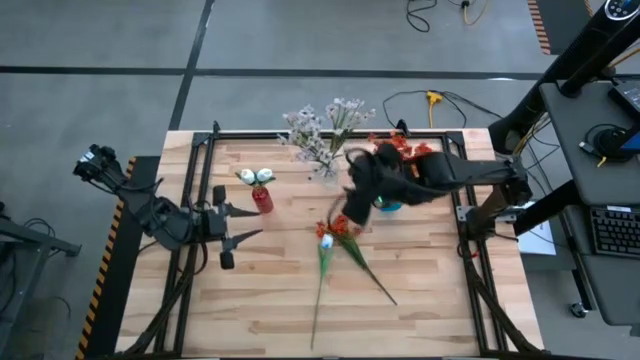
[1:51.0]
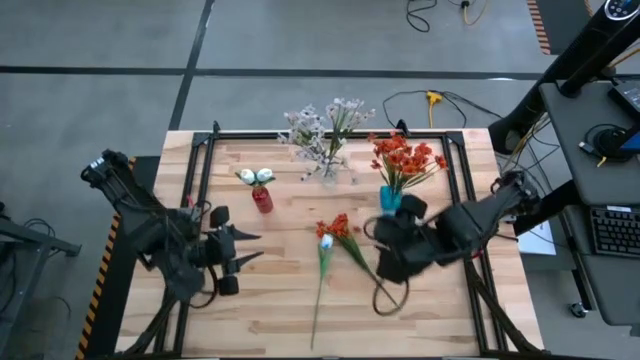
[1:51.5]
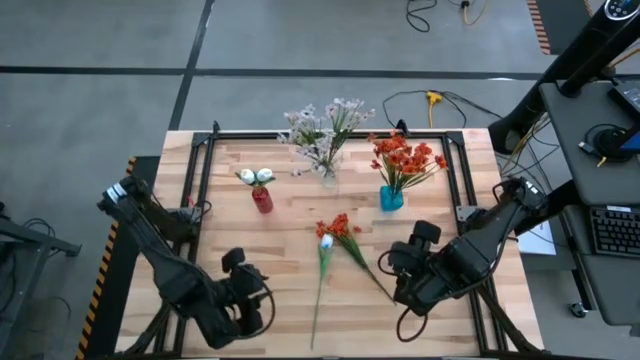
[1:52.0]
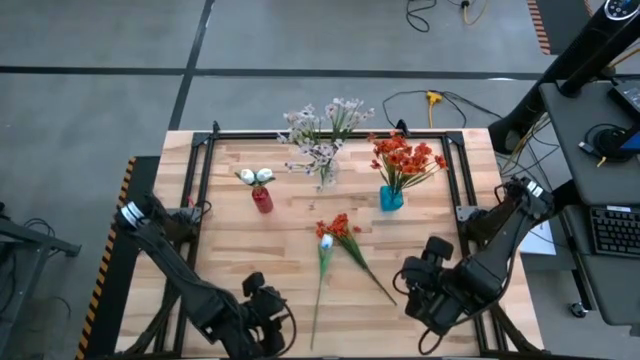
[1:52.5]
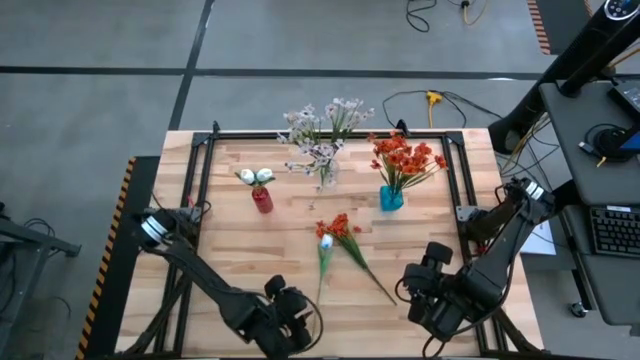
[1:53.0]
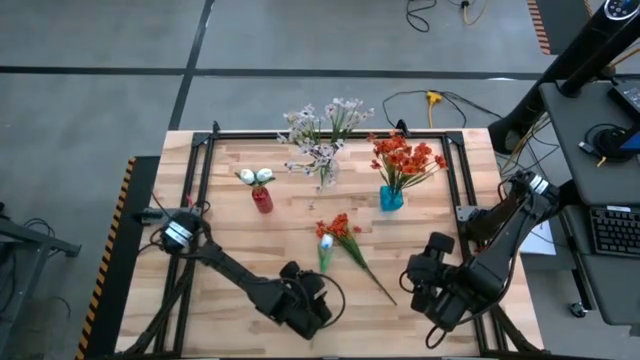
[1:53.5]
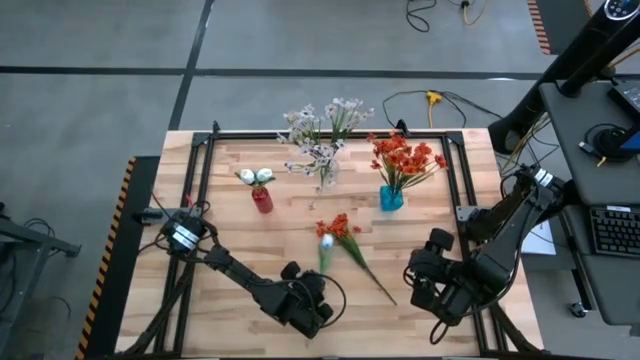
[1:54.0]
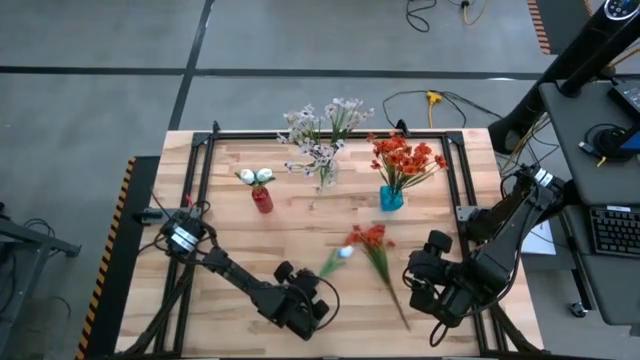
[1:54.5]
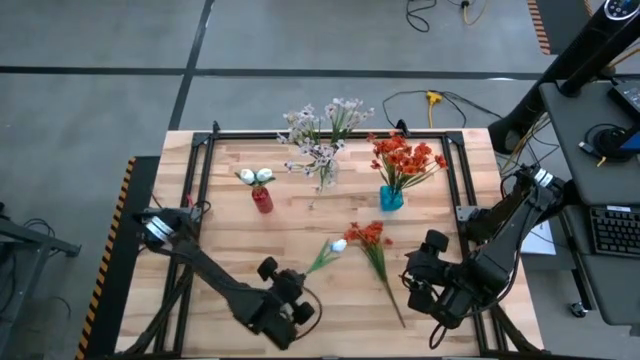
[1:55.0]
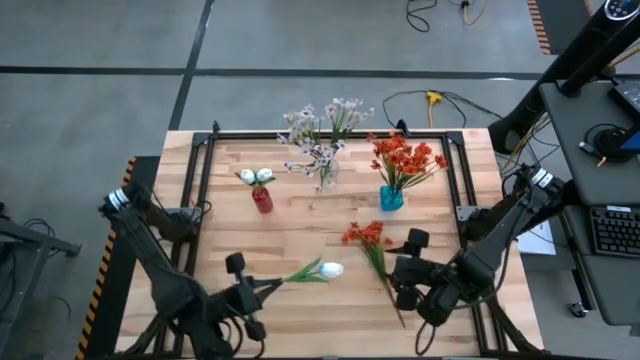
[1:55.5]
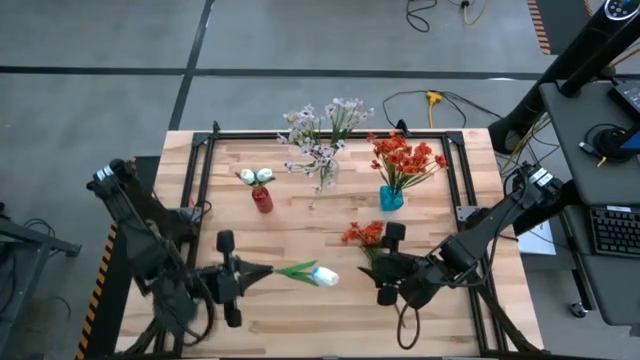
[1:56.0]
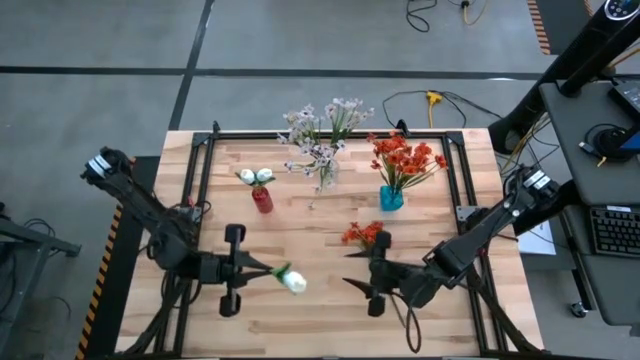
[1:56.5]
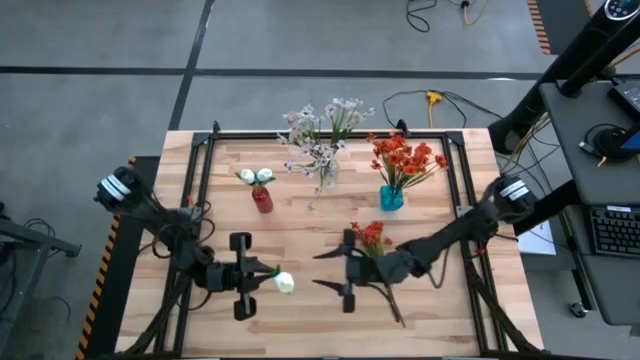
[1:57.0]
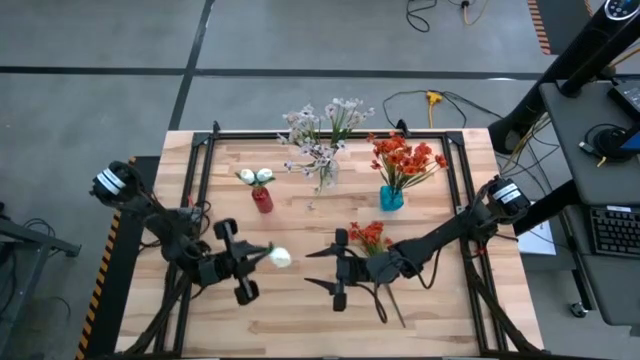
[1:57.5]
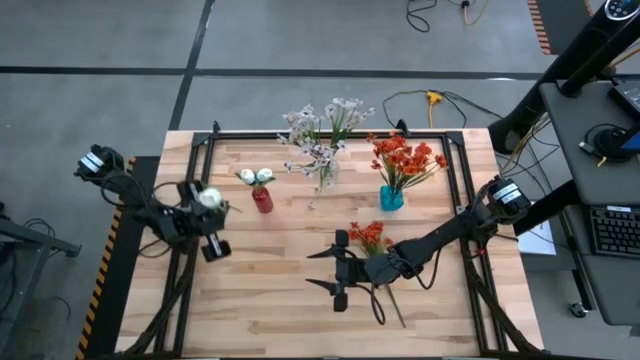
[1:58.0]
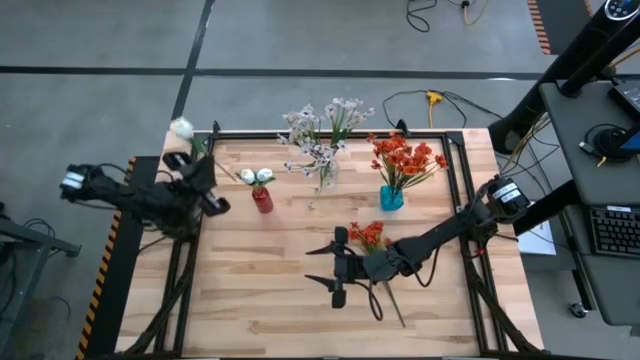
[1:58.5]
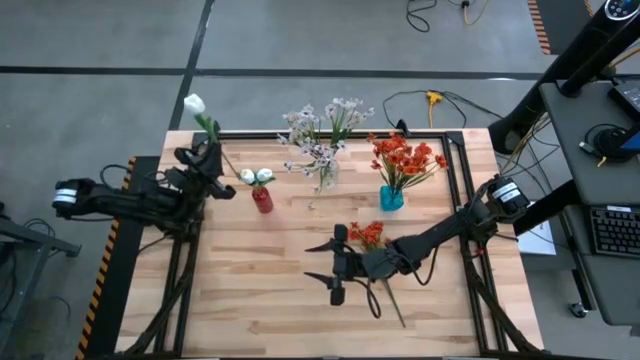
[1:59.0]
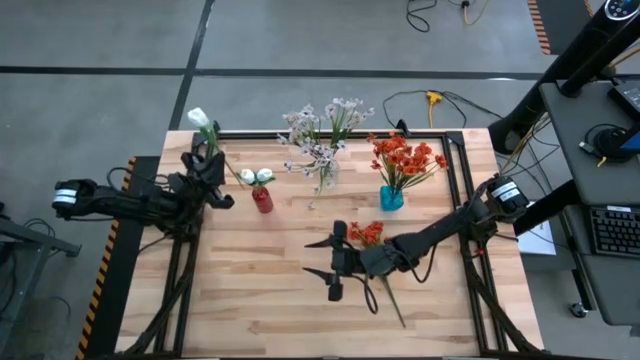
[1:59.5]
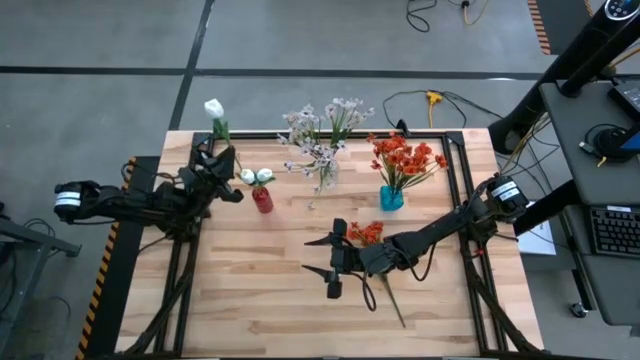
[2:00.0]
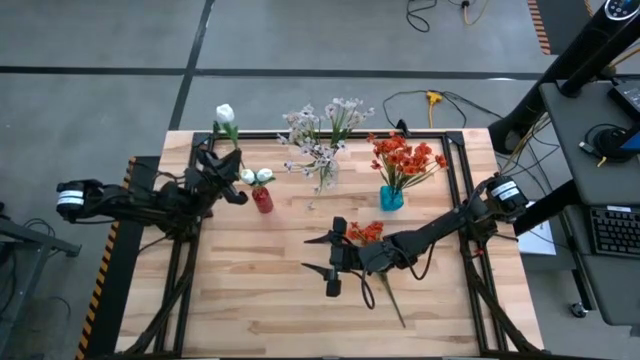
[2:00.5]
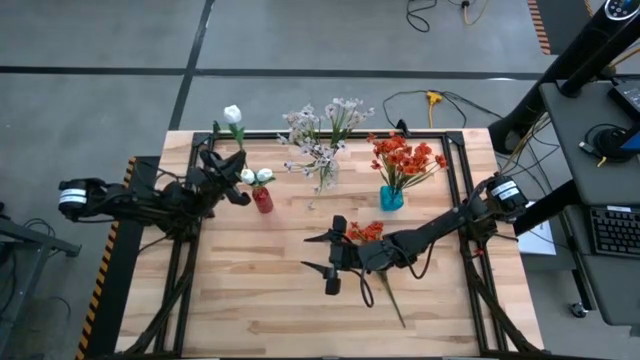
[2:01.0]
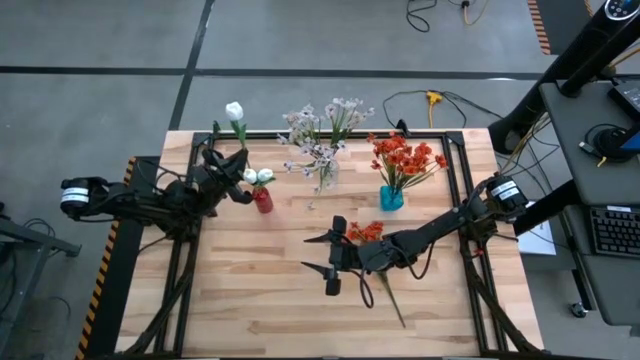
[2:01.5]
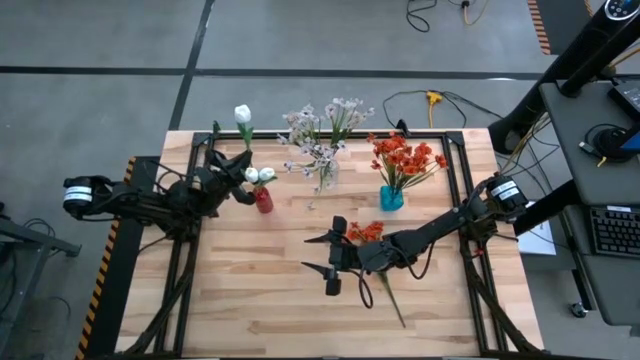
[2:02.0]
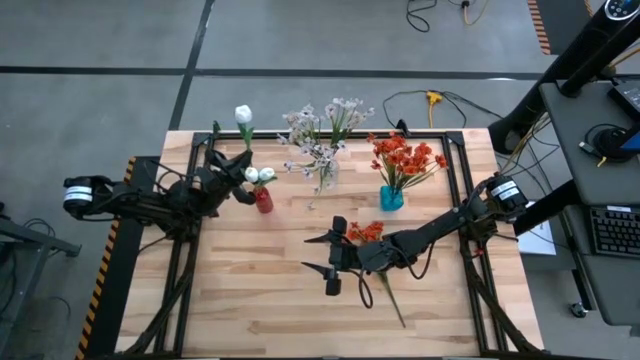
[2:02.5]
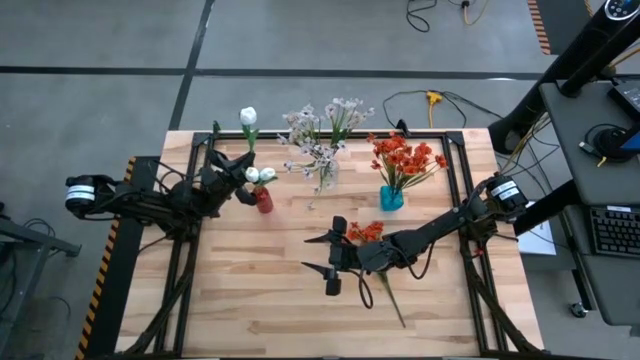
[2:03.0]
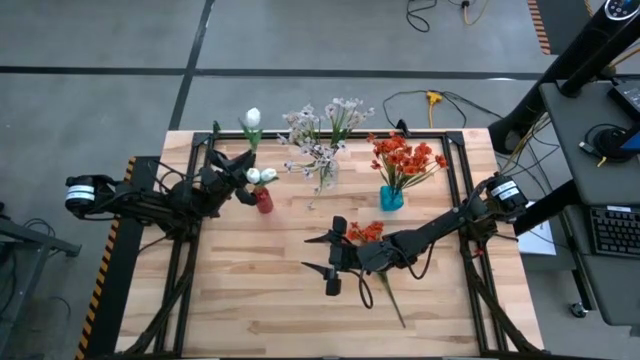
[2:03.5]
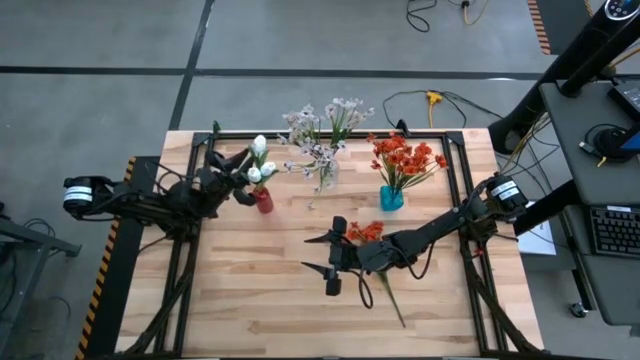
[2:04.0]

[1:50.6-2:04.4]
Task: Sort flowers into vase by color
Put the white flower into the red vase

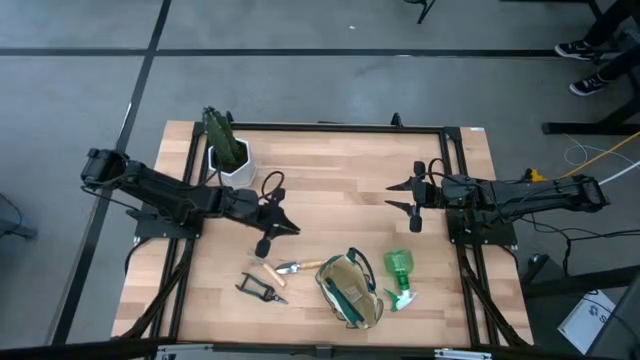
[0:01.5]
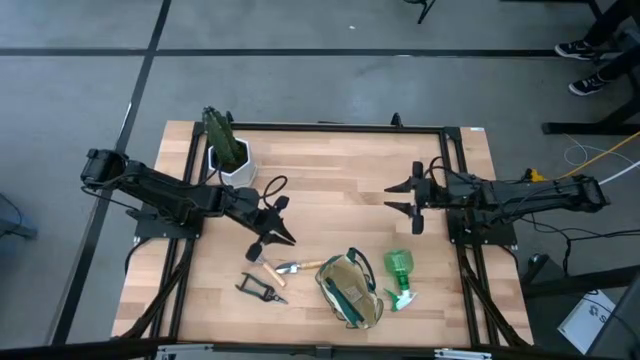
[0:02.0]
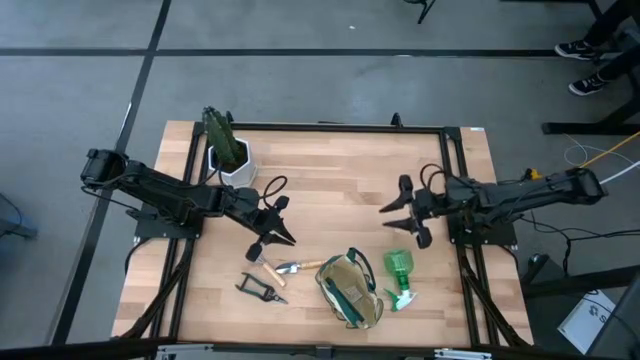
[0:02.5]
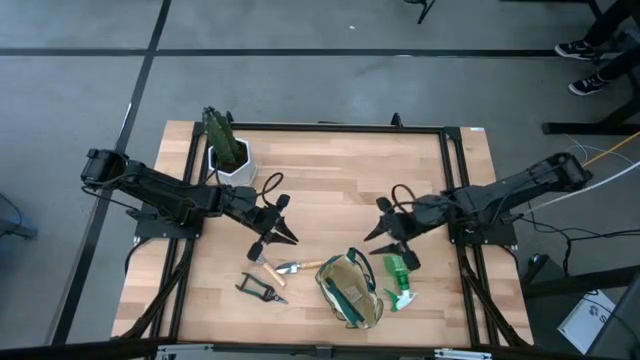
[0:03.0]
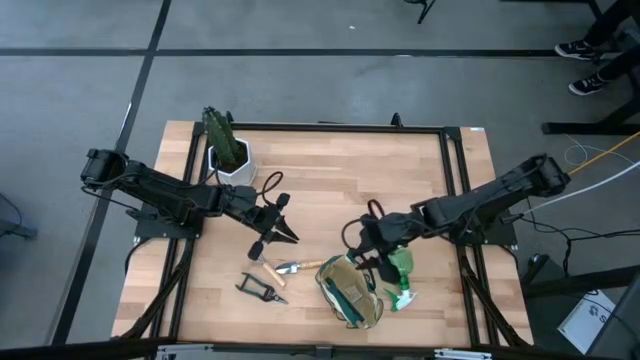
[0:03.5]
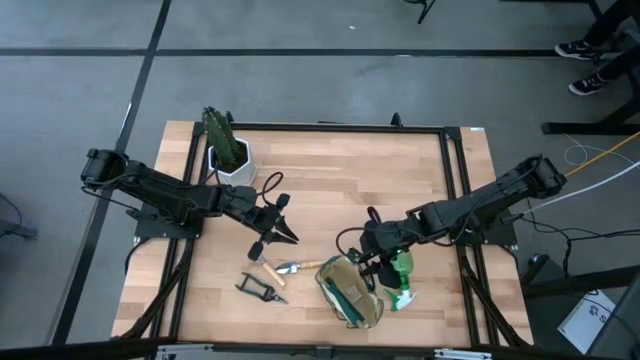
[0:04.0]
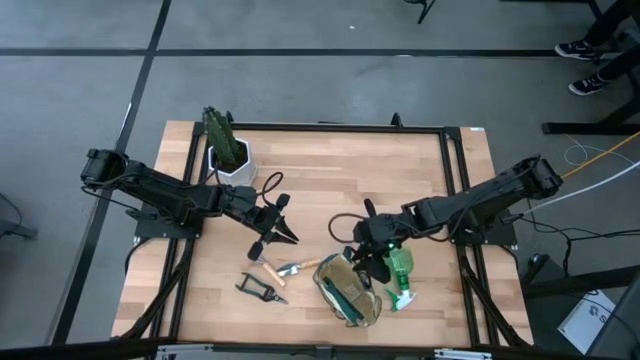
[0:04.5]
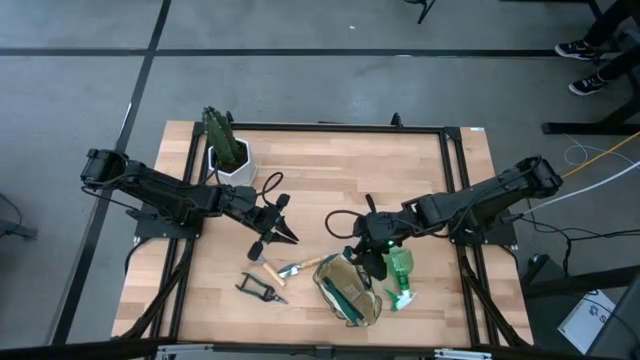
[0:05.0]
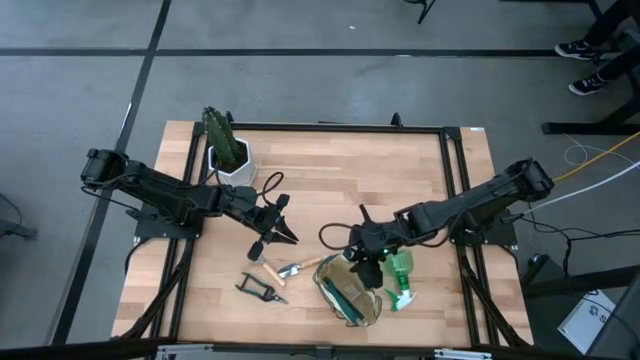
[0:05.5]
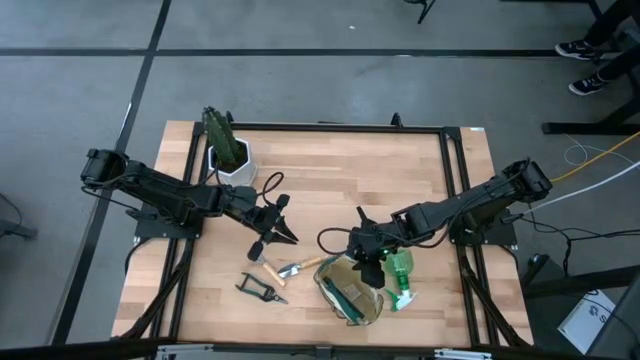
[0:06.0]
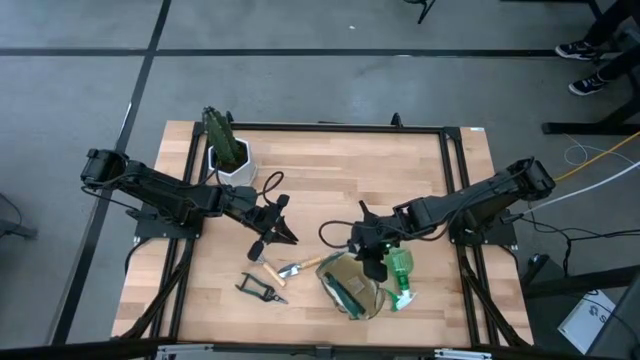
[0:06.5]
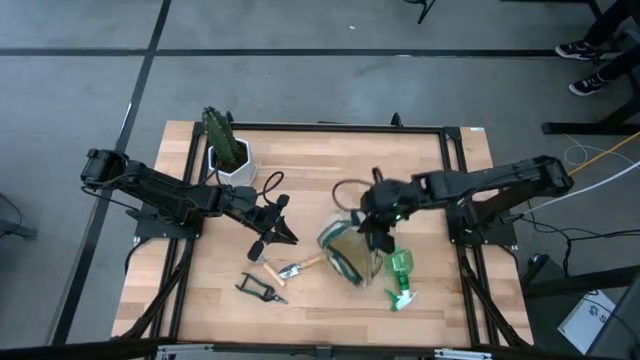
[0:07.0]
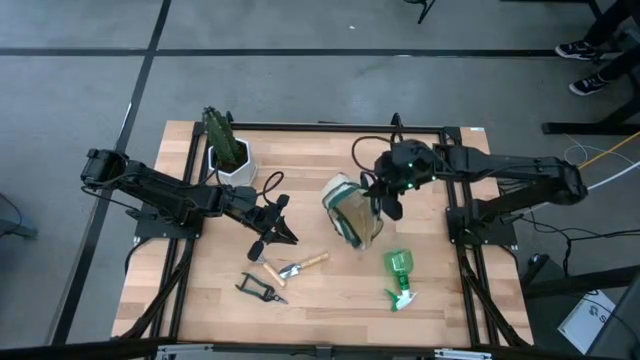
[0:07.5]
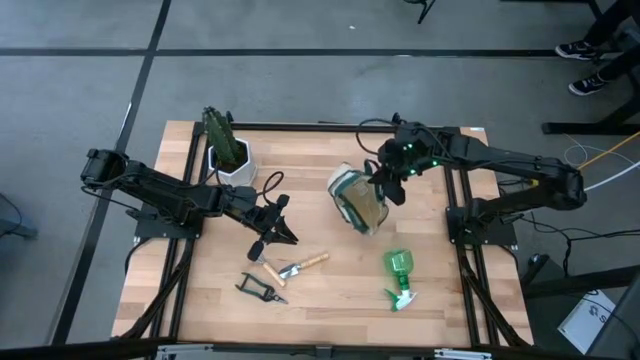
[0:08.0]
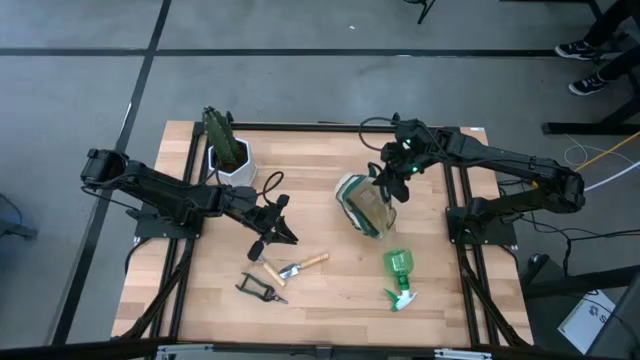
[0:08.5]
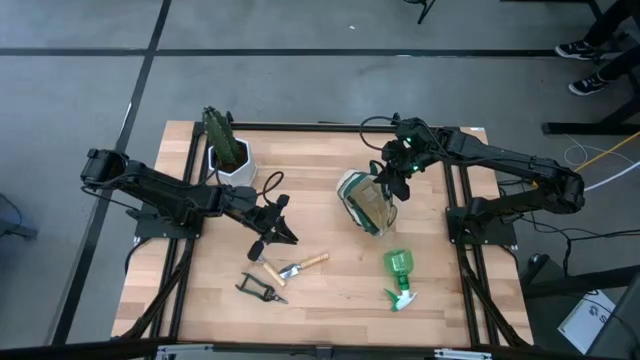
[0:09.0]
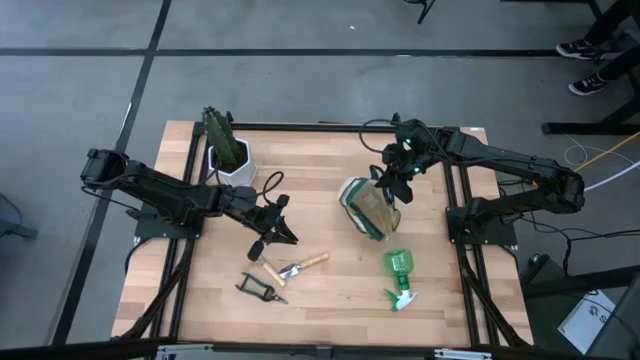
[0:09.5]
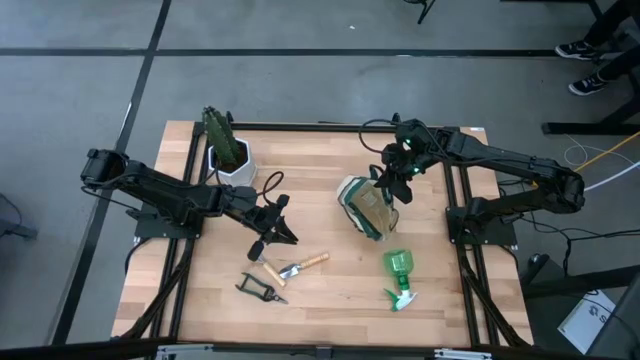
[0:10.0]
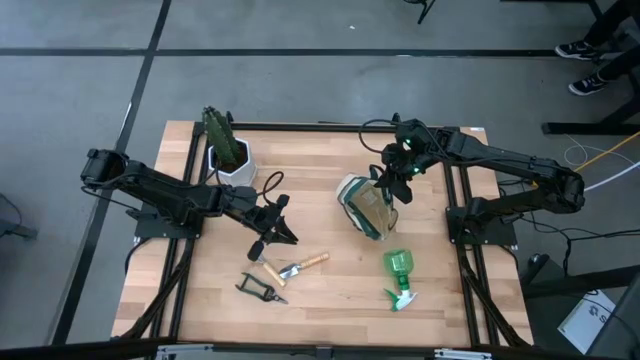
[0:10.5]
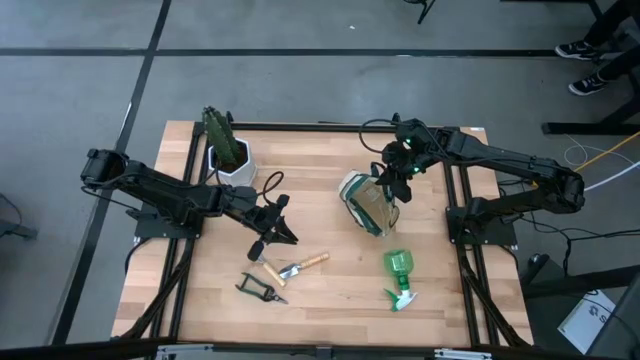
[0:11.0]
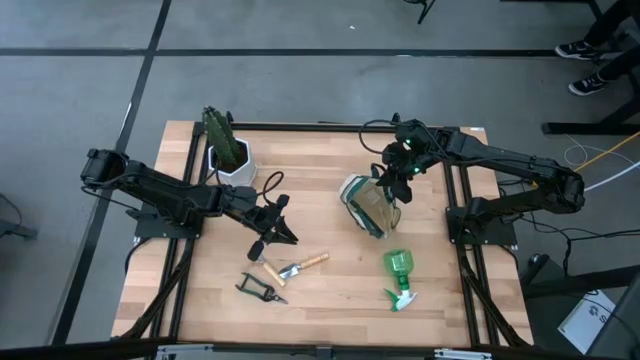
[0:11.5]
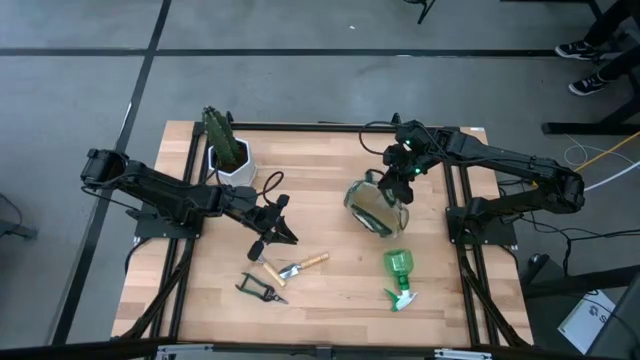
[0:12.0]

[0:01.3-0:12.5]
Task: Pick & Place Garden tools in Gardening bag
Move the gardening bag to the top right of the table
